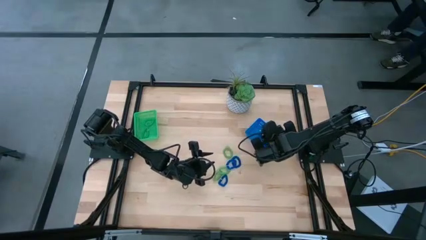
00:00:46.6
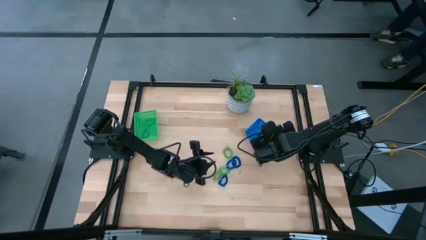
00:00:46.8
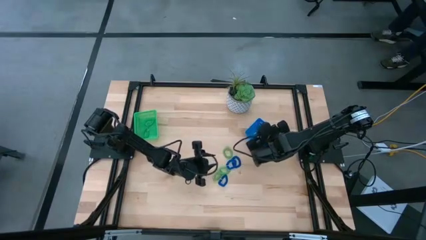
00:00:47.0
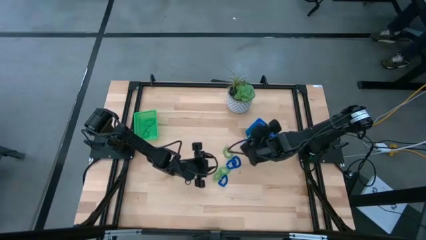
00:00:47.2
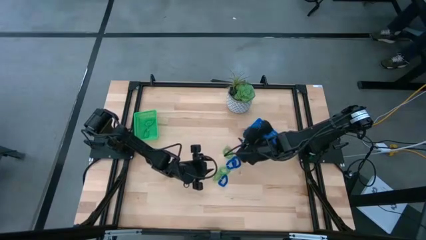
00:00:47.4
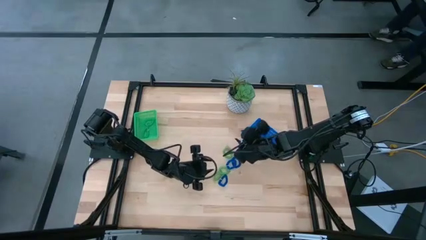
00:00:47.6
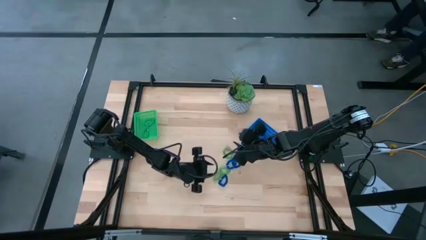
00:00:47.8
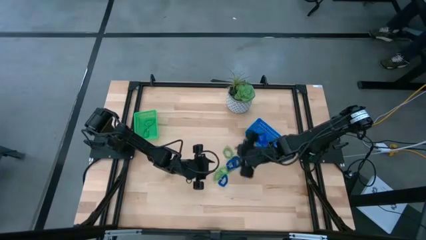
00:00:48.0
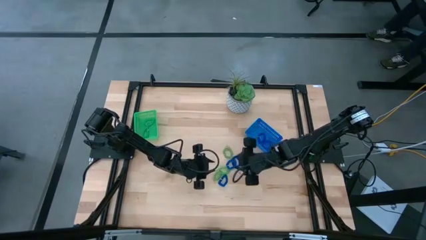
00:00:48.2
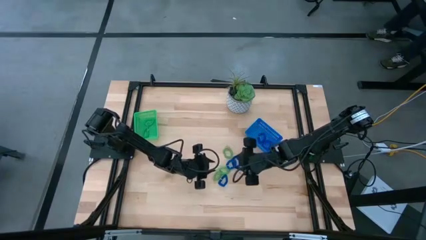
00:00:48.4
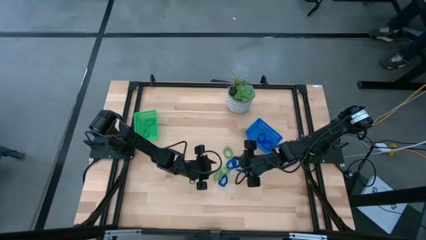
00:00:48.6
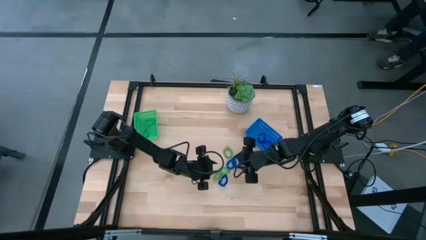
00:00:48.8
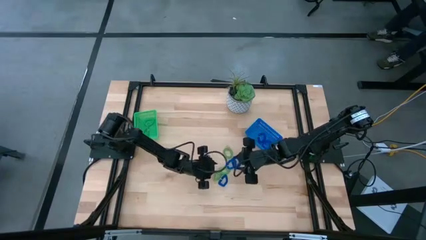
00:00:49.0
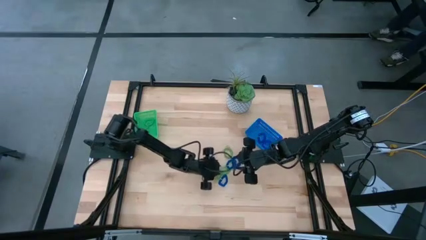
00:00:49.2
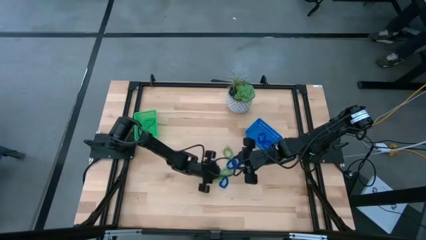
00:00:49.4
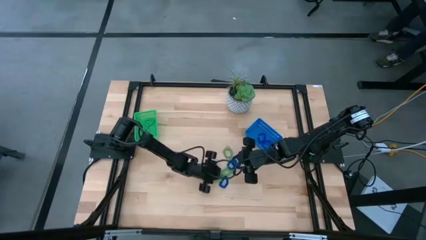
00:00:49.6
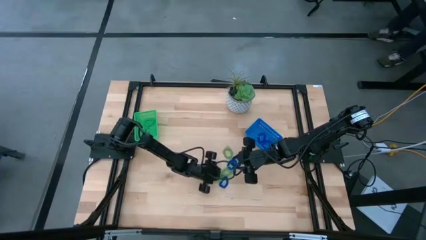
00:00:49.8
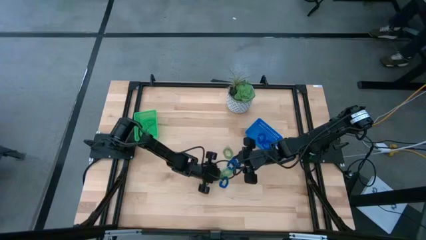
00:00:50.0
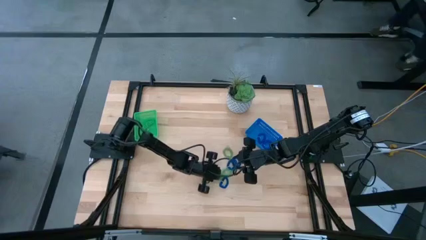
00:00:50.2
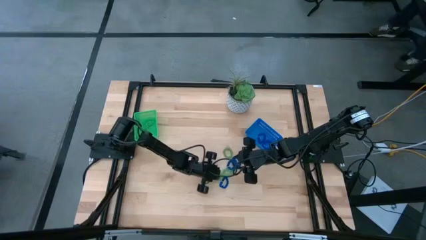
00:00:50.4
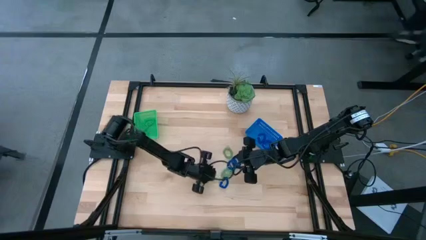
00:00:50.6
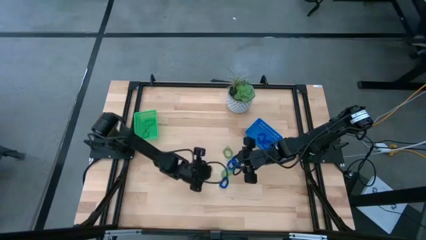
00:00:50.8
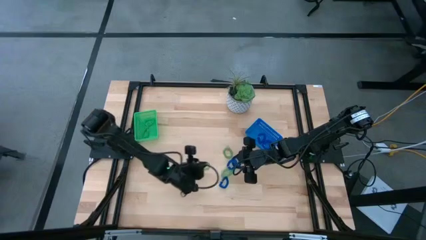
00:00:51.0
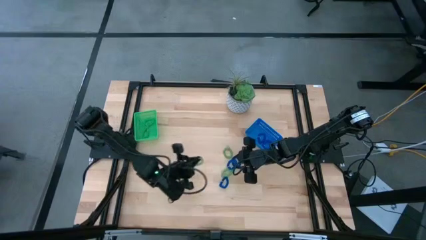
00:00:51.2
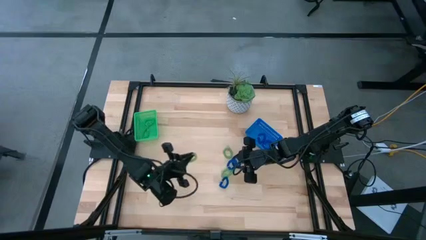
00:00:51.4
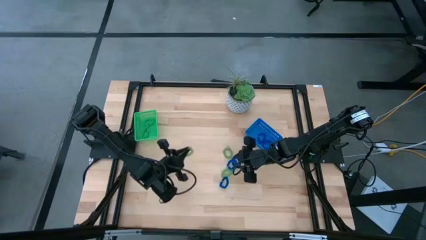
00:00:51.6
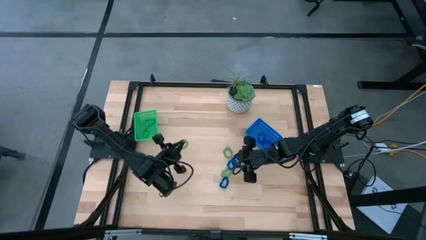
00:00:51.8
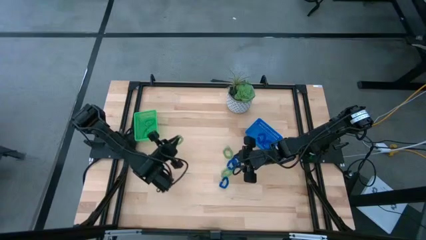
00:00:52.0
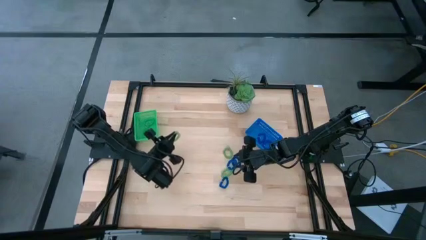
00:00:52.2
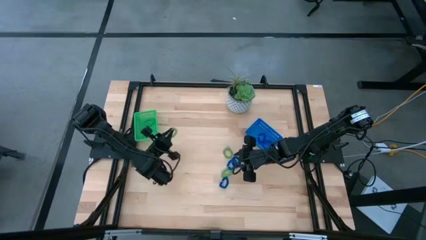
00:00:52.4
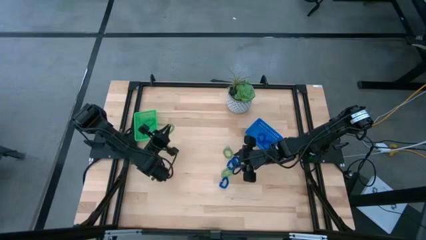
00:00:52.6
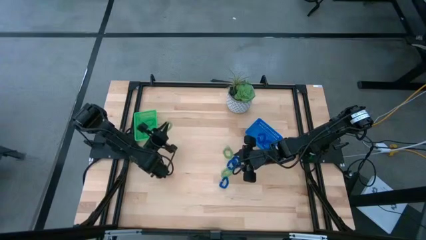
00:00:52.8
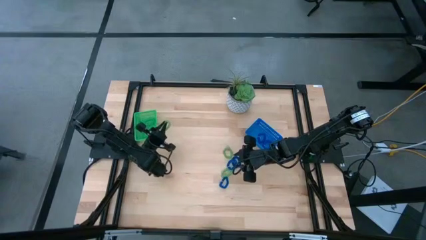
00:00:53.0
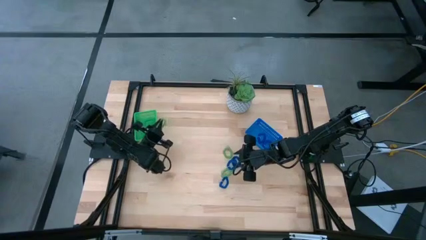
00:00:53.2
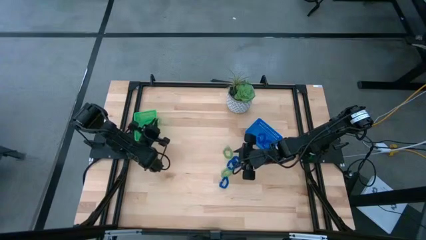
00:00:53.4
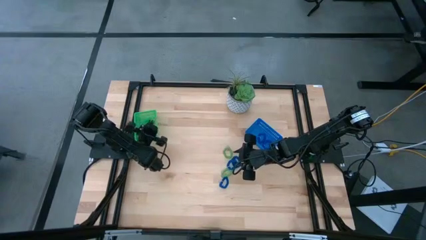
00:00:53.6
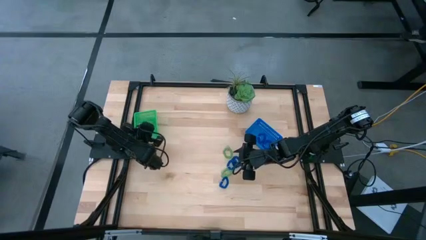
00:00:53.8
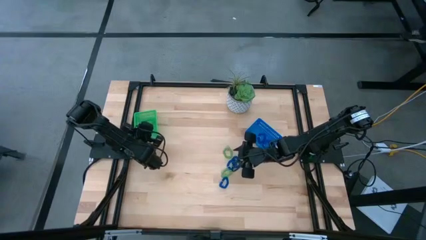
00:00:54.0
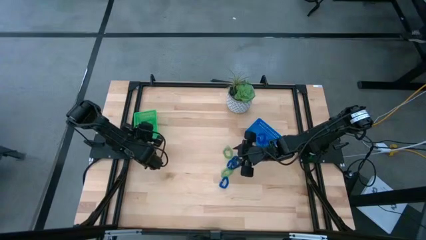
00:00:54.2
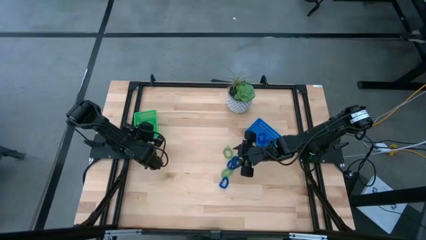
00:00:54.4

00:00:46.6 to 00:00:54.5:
Task: Sort spring keychains
Put the green spring keychain in the green bin

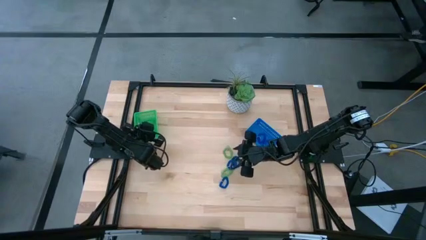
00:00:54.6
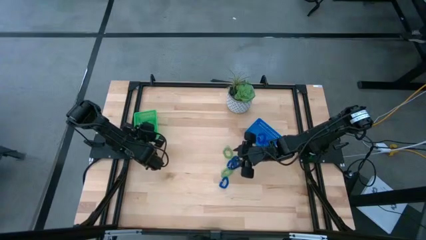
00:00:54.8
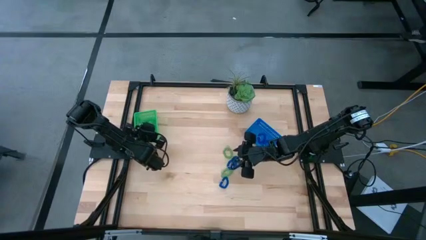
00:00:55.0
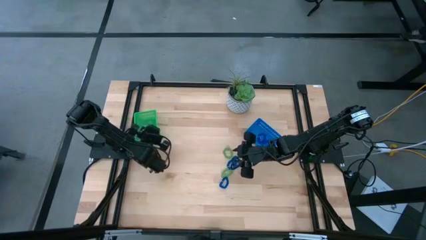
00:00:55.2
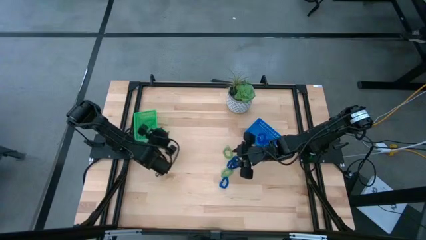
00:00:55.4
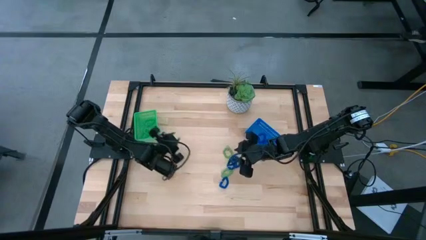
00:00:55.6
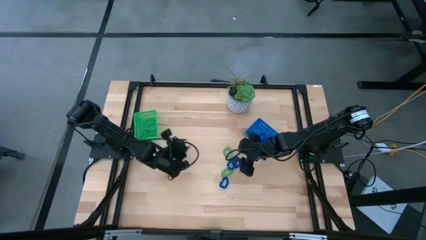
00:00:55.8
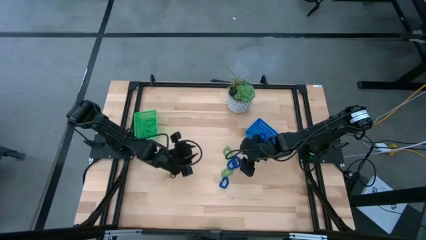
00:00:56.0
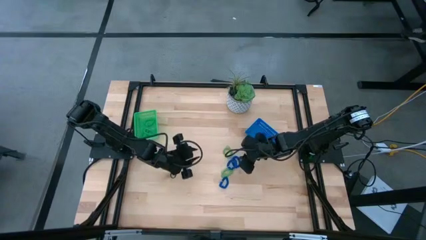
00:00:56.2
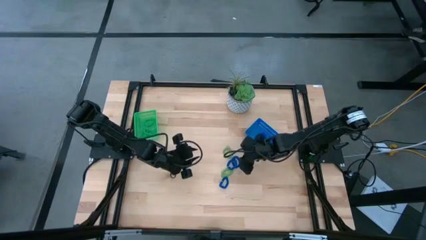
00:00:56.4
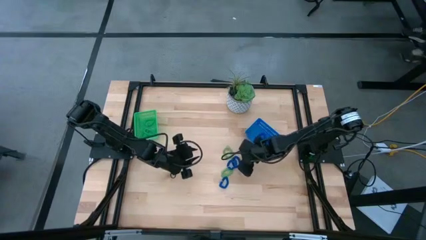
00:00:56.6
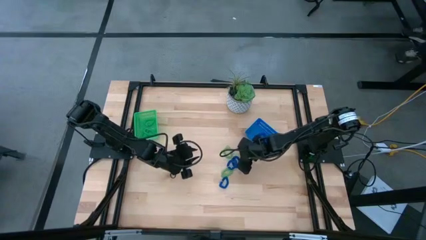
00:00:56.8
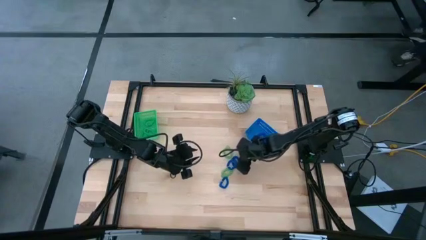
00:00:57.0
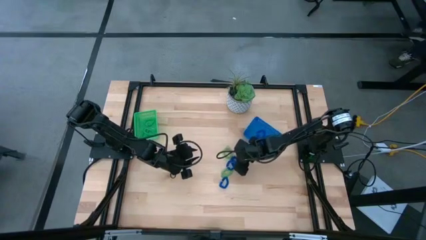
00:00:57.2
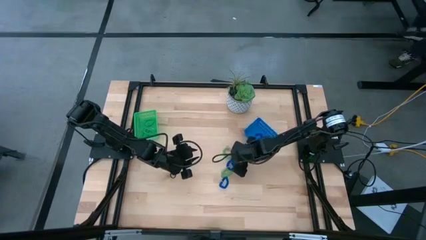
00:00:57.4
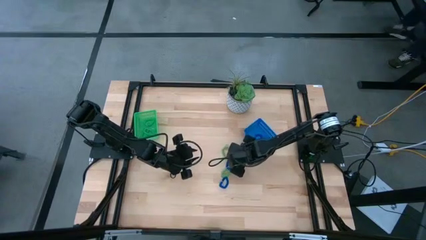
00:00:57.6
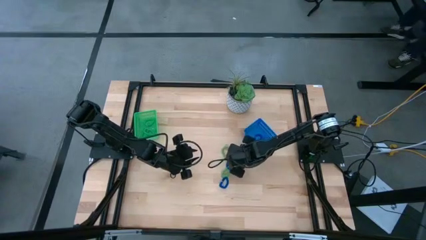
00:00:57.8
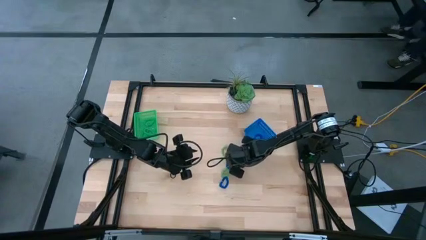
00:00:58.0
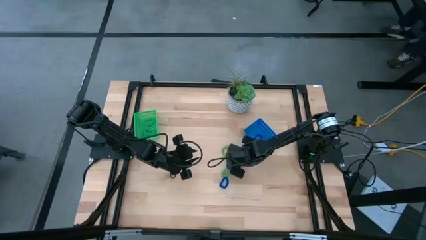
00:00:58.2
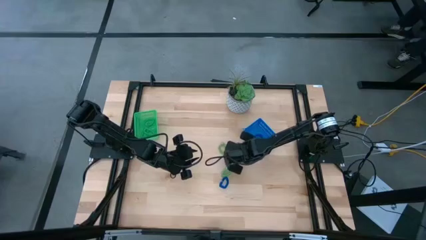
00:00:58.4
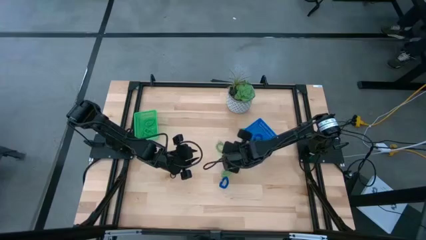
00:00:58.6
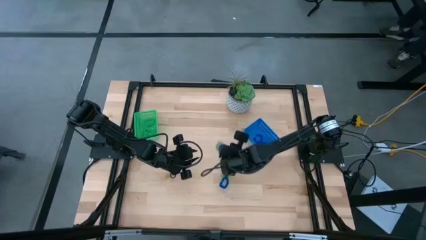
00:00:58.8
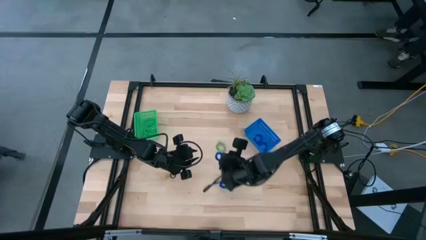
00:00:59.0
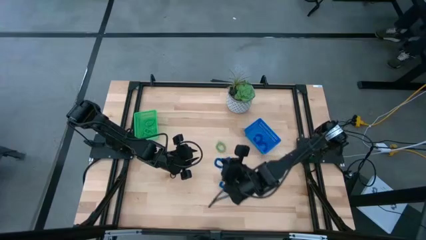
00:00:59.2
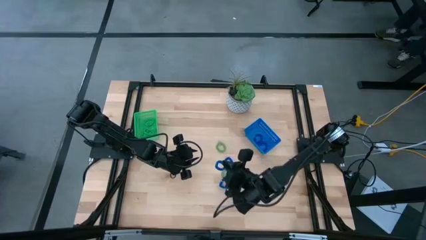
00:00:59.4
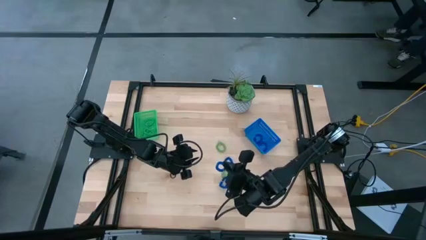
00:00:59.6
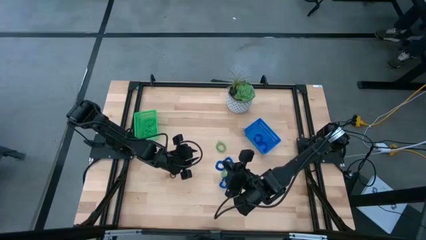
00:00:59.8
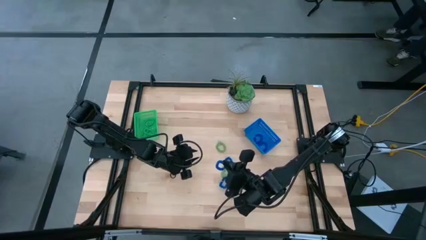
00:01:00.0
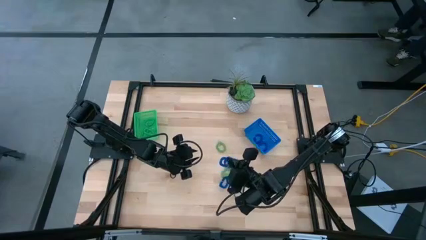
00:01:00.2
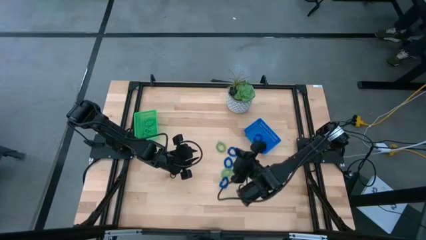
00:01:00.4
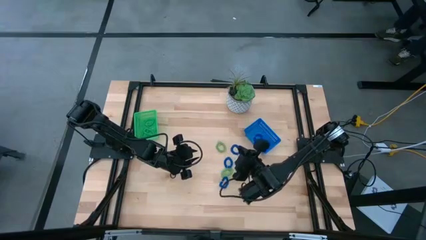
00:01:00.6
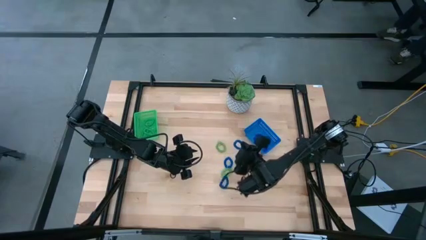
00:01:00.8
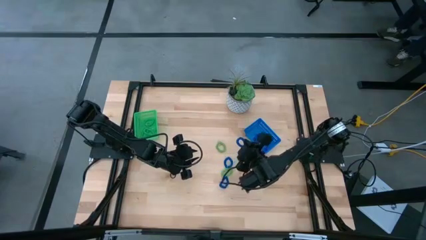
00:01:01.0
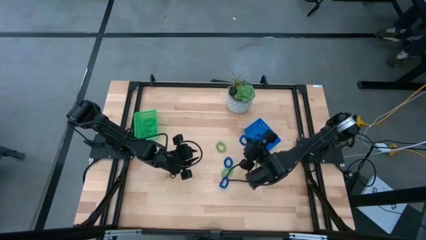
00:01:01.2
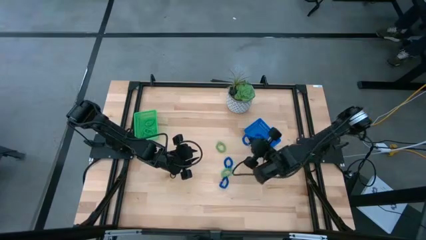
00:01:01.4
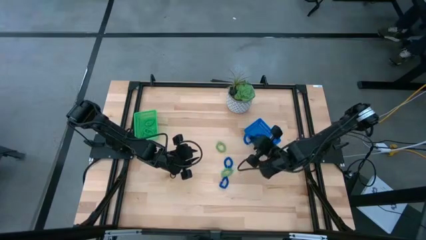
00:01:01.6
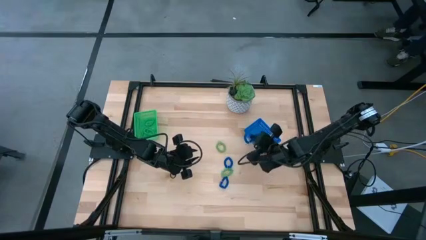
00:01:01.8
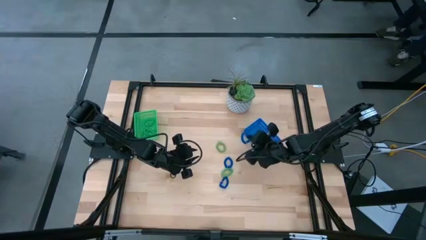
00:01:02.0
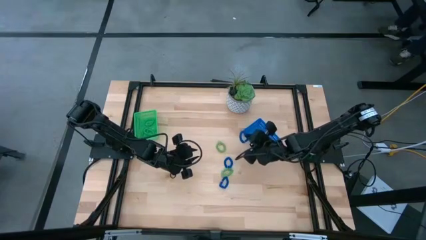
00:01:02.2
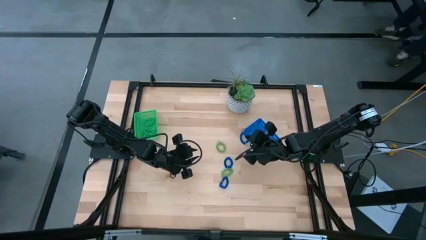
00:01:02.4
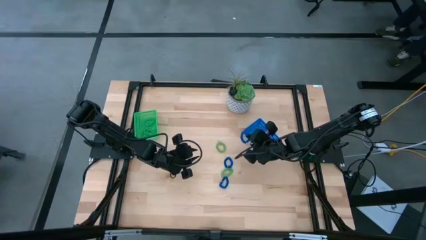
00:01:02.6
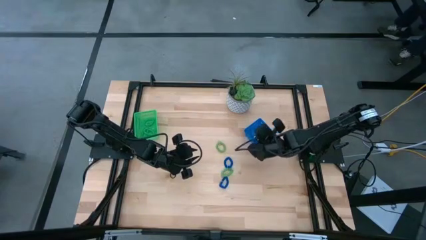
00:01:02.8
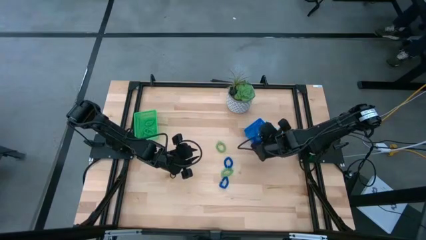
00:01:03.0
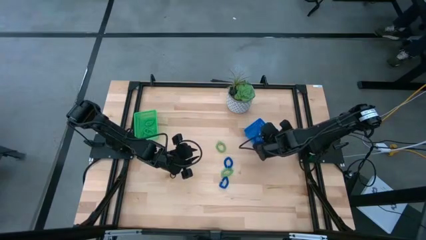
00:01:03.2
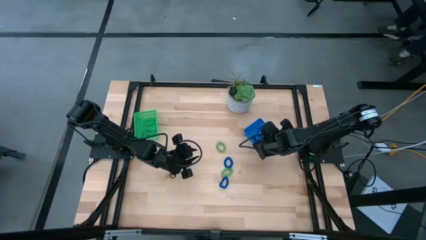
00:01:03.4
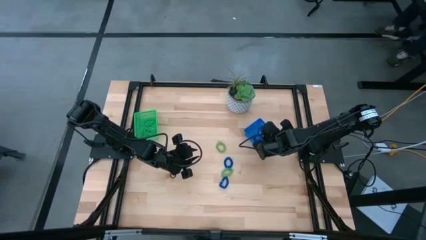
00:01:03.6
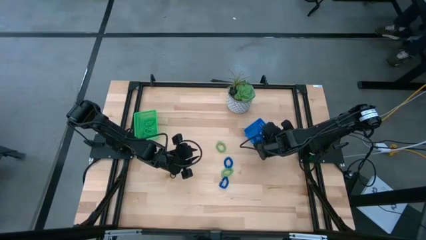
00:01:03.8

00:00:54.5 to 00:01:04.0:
Put the blue spring keychain in the blue bin
